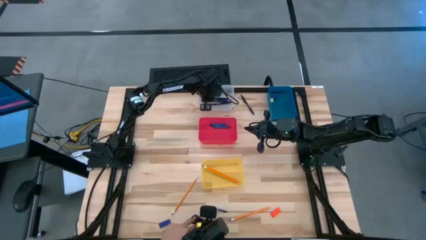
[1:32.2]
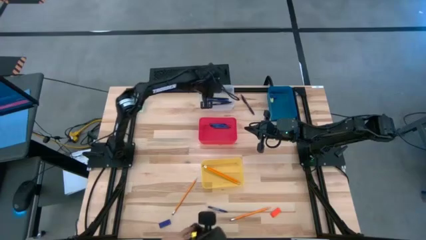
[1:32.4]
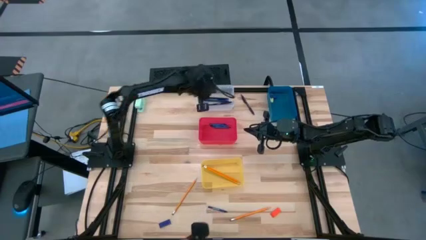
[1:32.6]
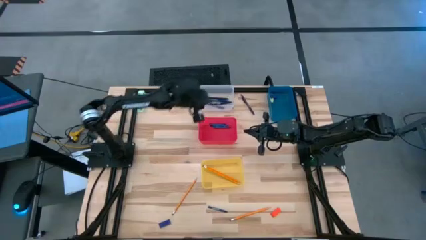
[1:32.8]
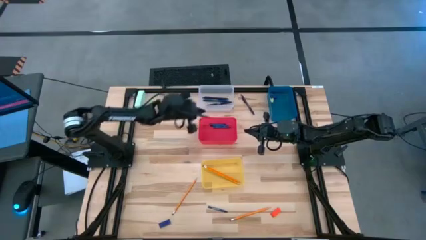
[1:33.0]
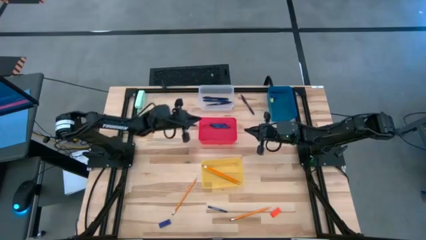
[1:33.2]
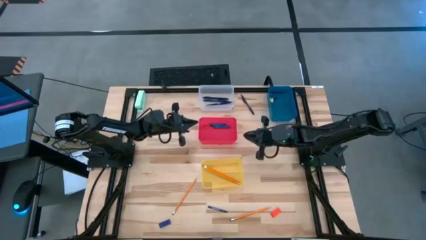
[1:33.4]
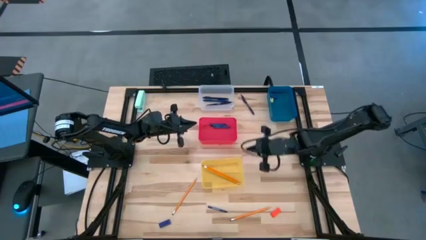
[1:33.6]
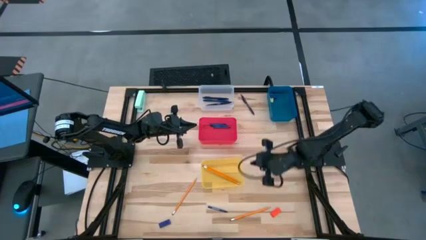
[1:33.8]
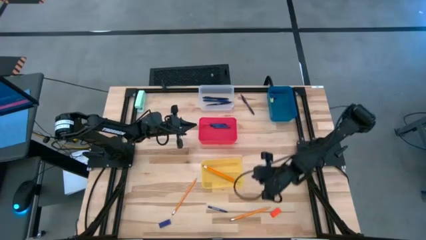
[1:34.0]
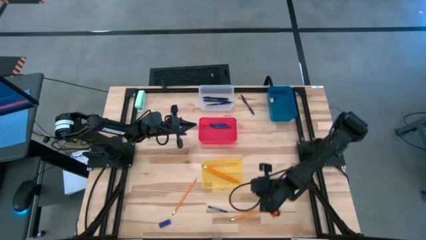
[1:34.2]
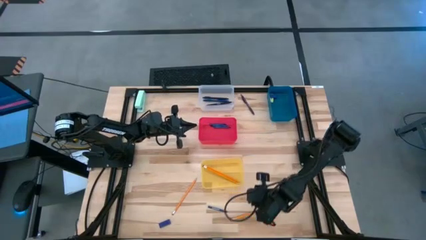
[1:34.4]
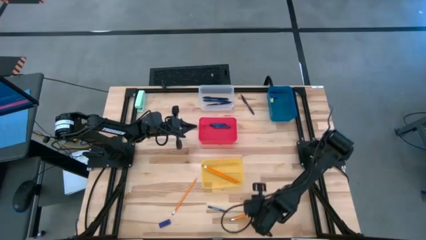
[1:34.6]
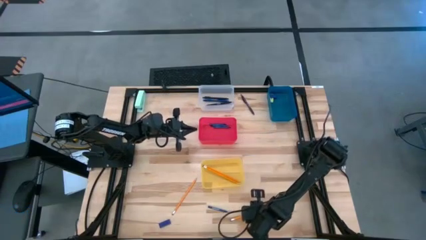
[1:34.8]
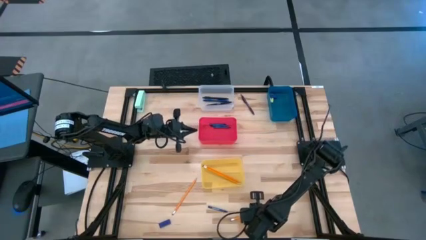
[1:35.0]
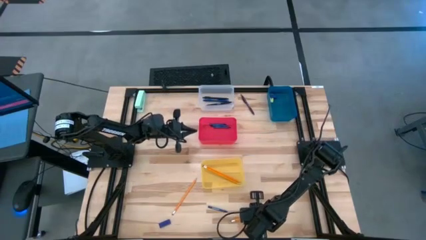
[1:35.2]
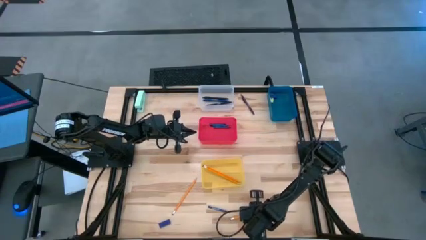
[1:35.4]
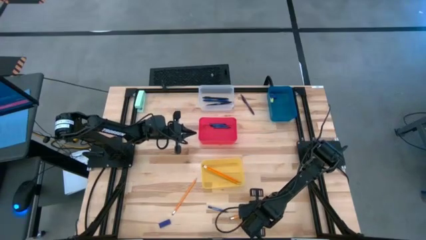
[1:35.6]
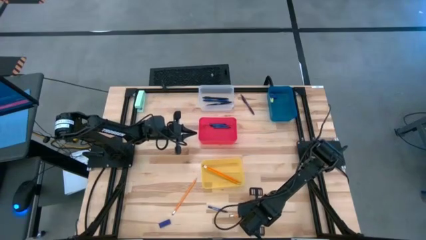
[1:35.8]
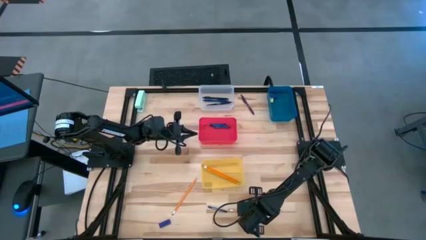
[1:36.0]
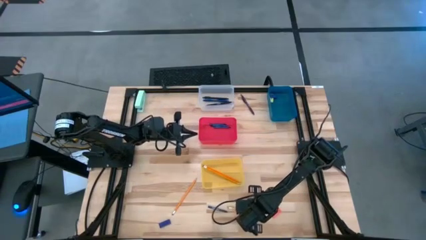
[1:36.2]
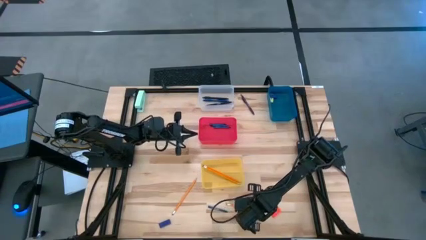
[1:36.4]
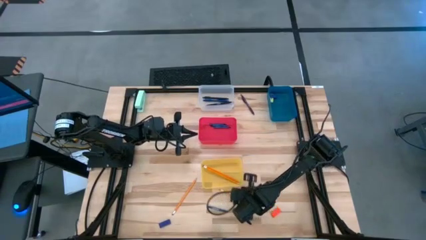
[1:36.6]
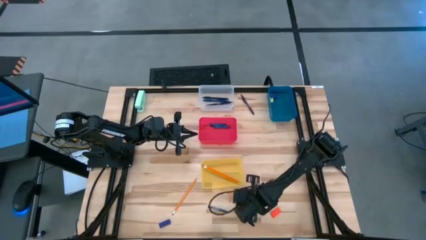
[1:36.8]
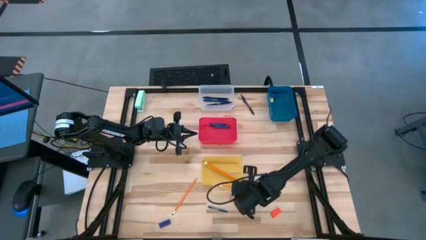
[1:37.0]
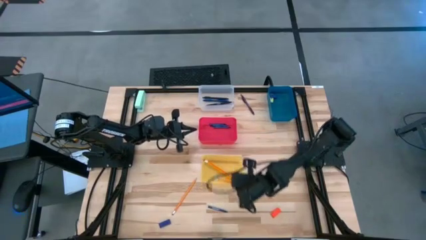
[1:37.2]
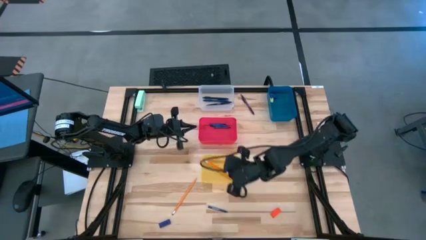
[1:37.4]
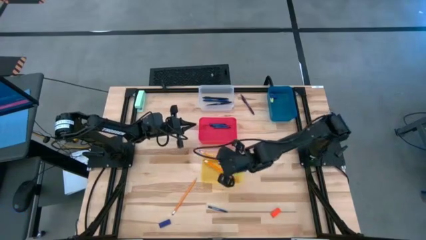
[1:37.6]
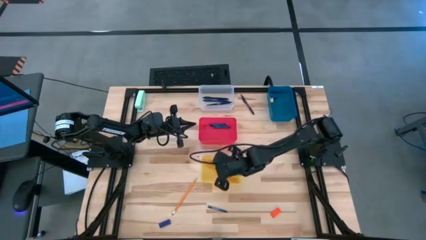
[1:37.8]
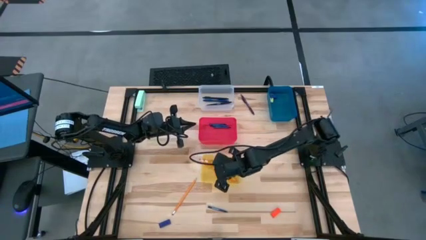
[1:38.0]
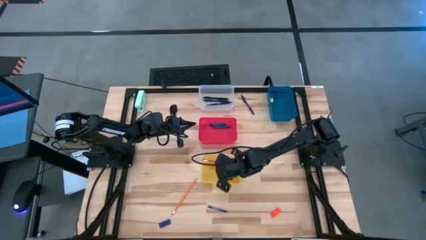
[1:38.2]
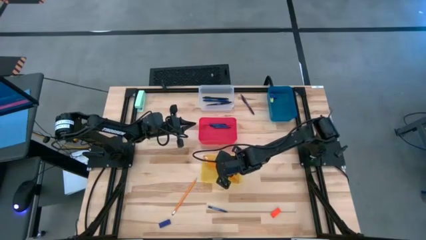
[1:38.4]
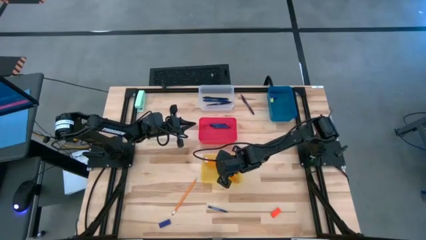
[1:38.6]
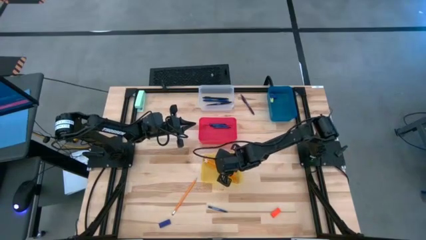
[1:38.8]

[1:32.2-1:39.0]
Task: Sort crayons/erasers/pens/pencils in bins
Put the bottom right orange pencil into the yellow bin

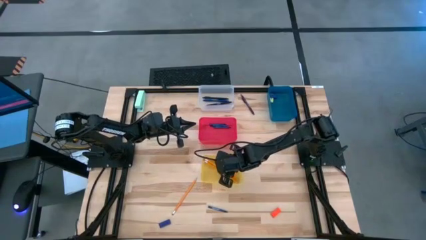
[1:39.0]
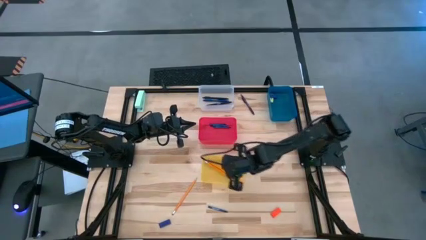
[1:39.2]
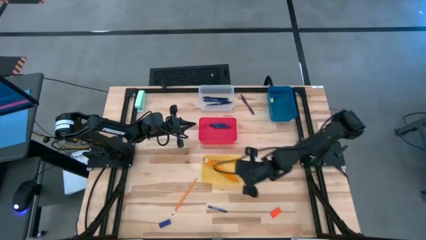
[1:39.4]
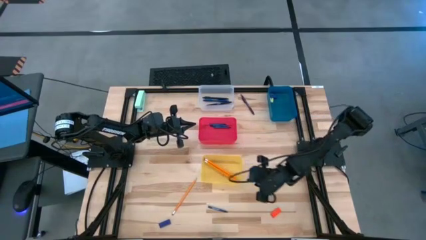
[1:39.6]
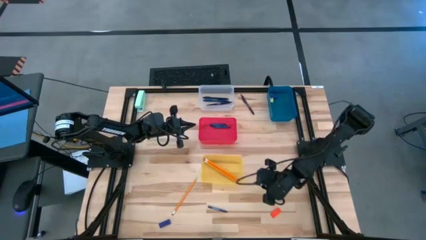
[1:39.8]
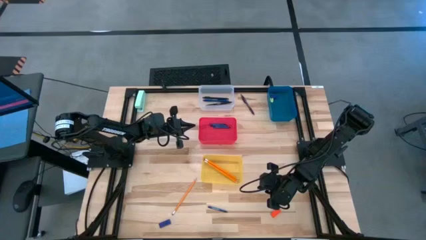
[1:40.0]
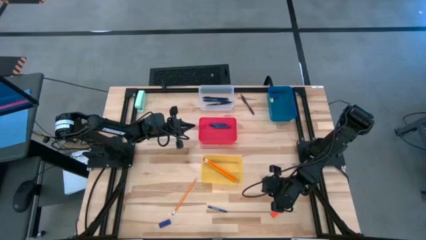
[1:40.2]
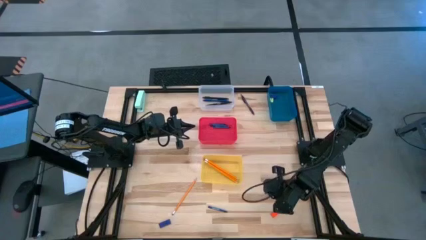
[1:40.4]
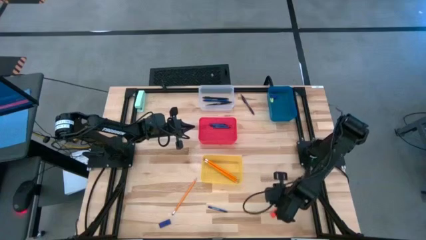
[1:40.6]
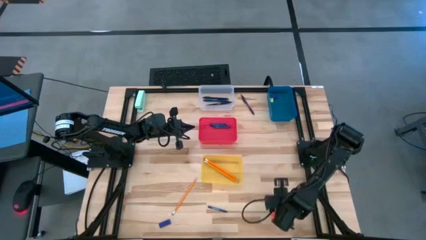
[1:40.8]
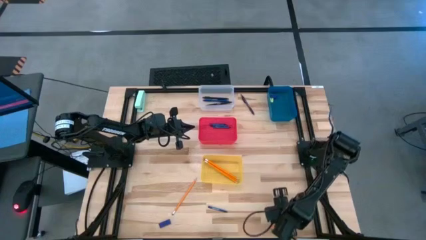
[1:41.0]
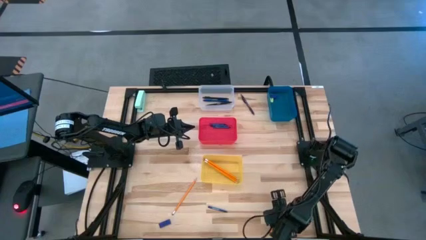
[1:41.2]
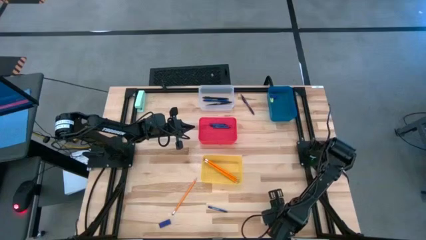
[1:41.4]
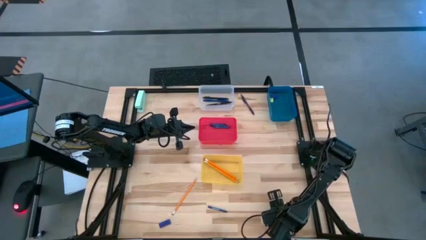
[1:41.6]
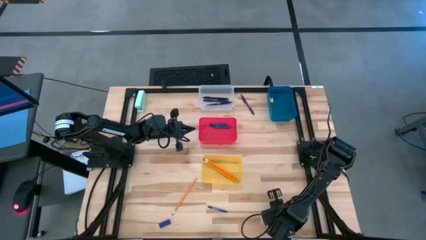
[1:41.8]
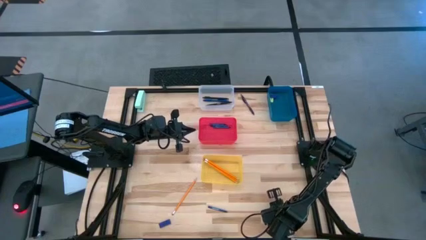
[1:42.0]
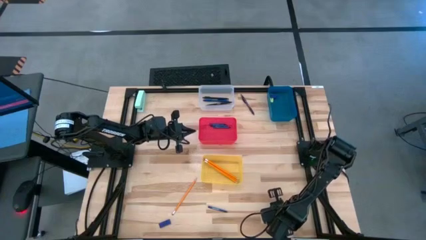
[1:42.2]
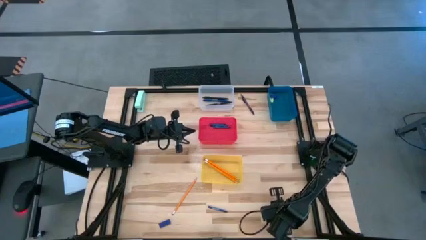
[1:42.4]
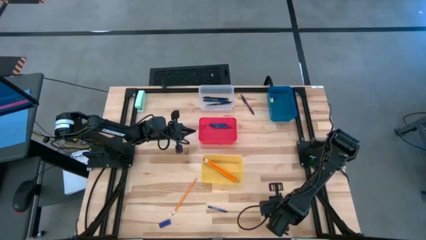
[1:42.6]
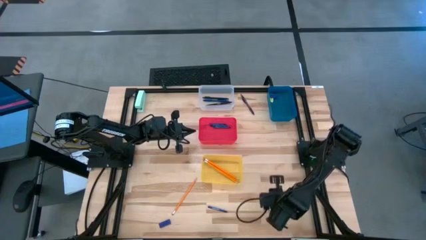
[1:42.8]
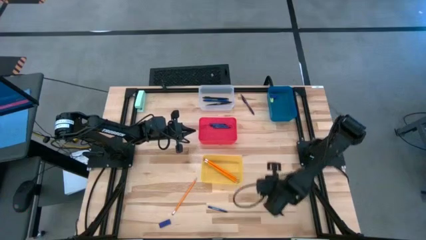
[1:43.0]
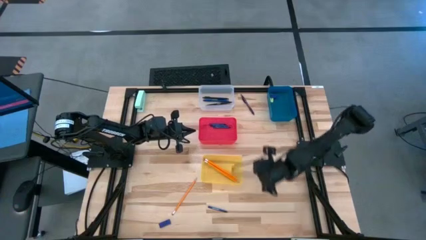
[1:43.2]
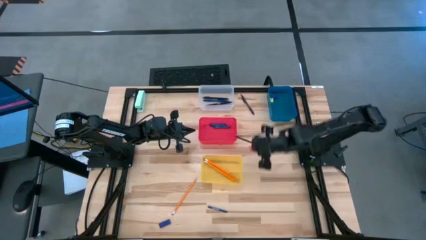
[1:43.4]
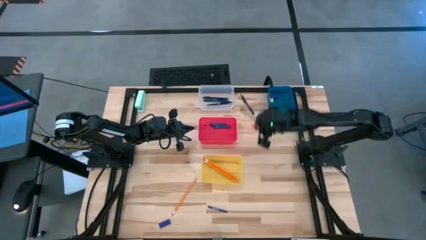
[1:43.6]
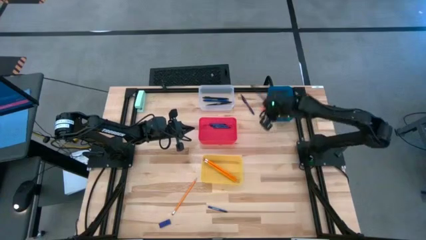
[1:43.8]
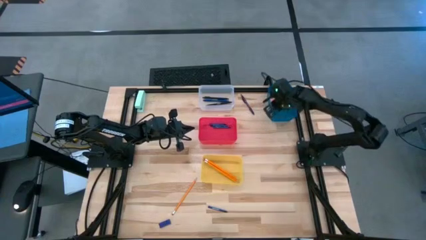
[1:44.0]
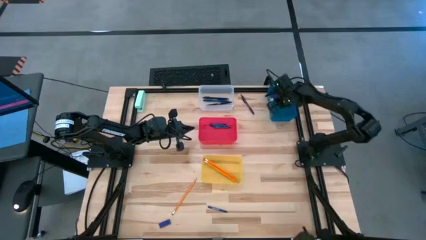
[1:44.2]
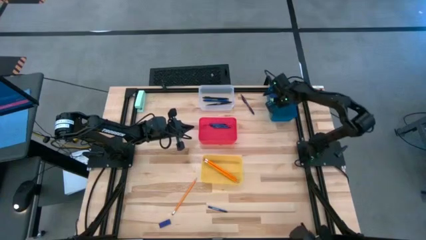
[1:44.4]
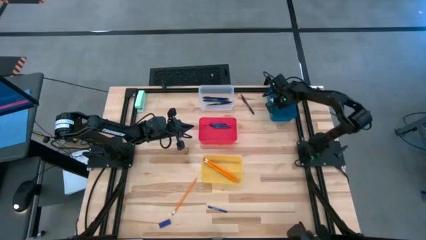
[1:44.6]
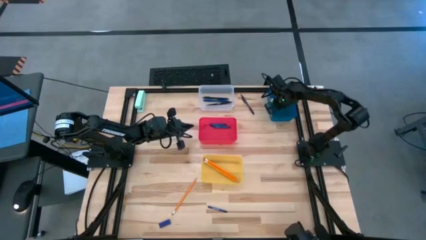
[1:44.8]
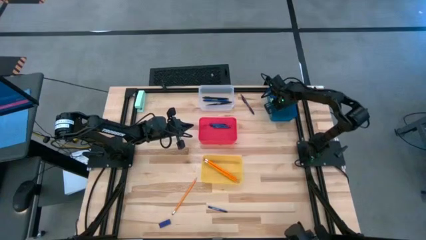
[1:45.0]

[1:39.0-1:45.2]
Put the orange eraser into the blue bin

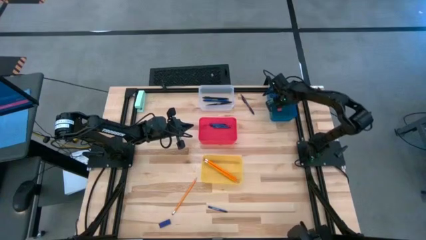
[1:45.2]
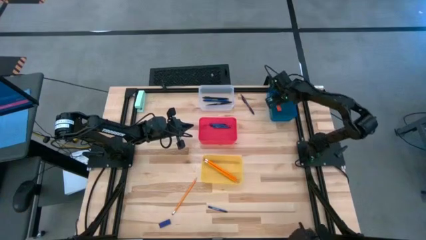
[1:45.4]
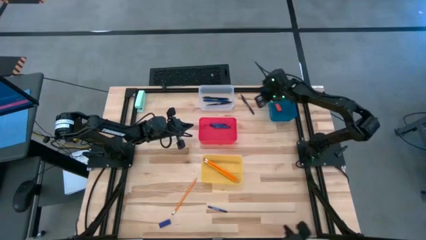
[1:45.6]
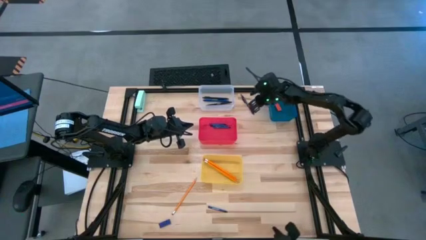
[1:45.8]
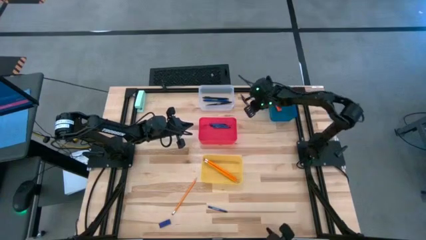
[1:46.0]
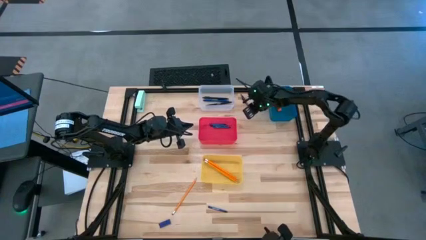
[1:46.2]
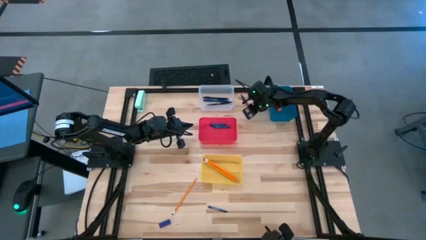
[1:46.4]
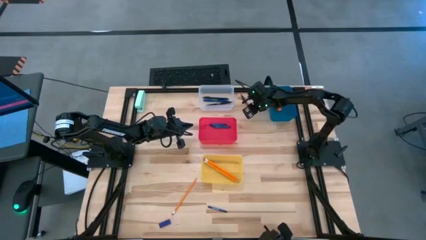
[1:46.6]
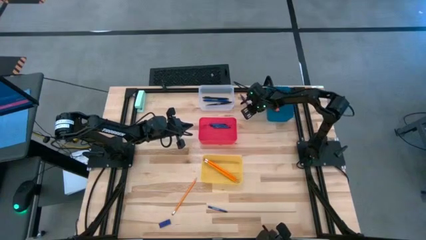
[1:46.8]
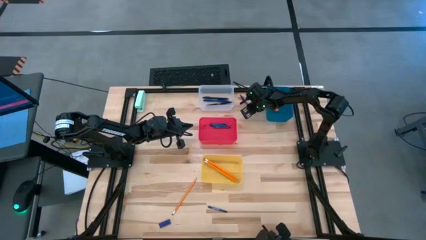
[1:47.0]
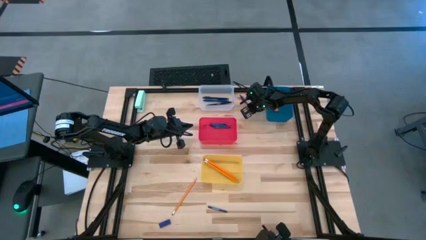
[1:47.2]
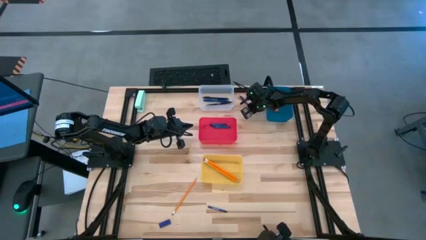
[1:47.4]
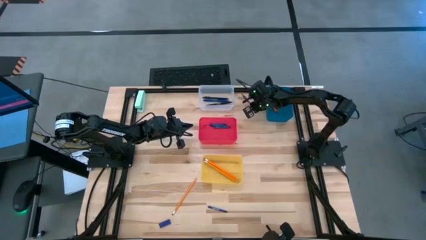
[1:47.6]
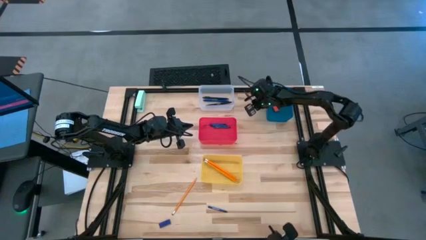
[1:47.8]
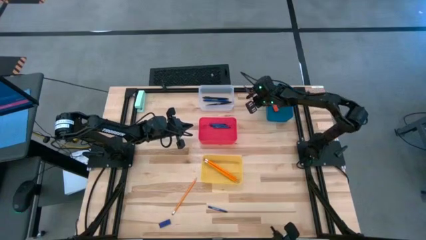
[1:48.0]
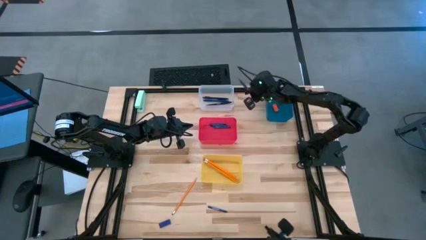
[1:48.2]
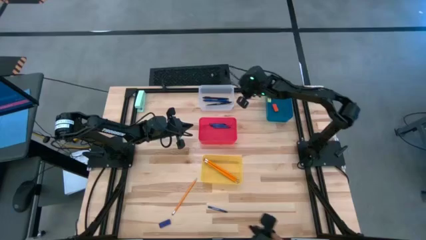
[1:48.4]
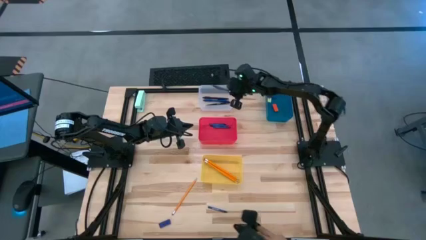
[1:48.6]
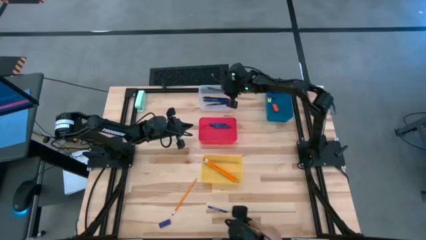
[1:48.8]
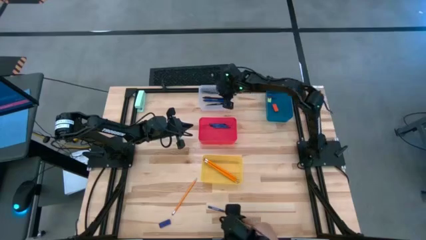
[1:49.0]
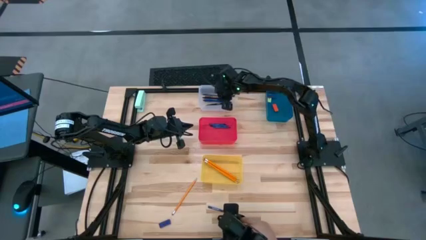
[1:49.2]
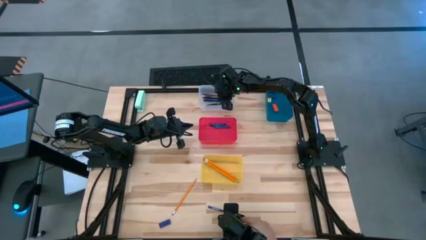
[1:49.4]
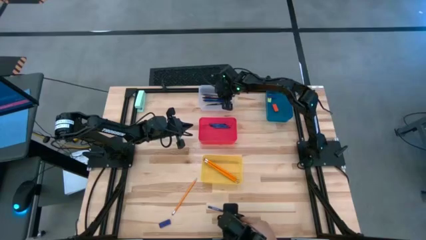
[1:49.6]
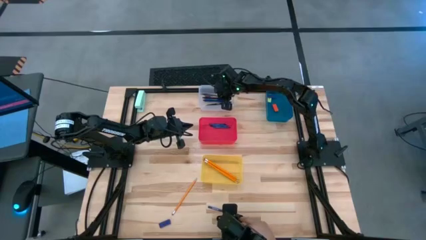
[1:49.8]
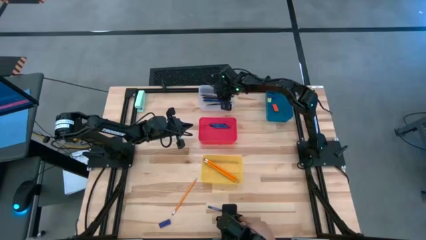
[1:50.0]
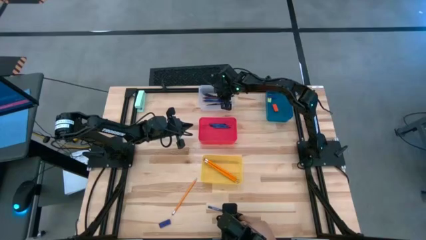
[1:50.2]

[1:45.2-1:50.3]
Put the violet ballpen into the transparent bin
